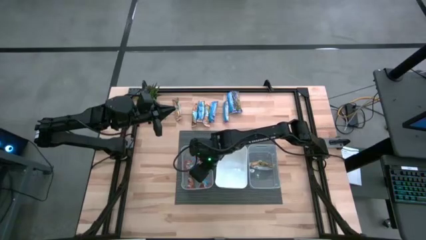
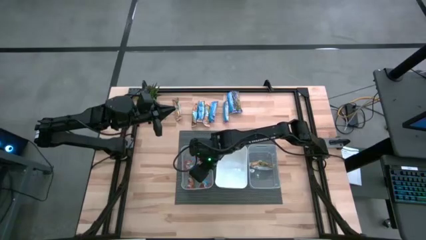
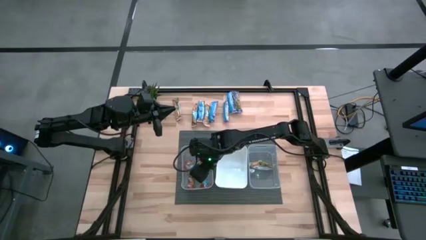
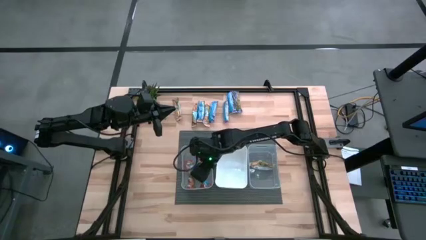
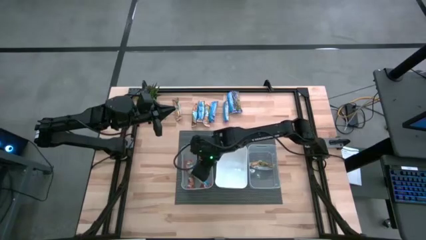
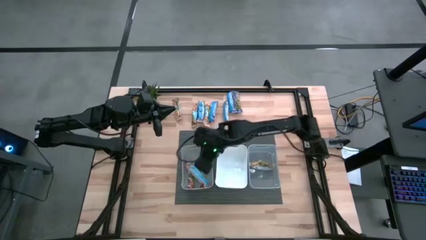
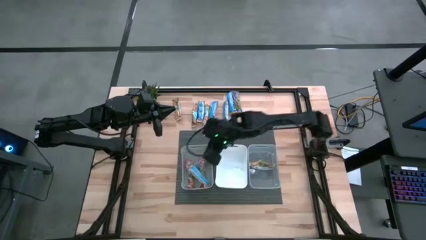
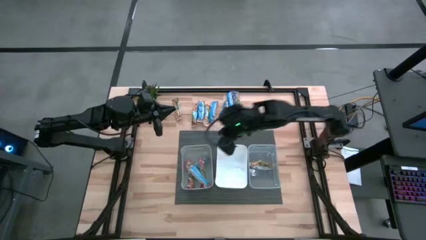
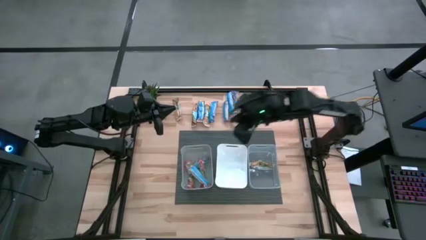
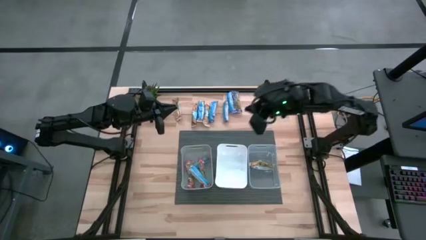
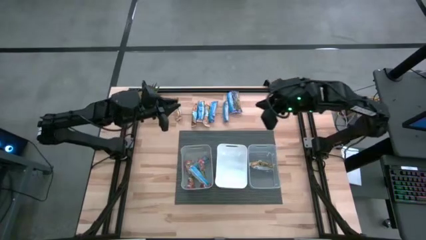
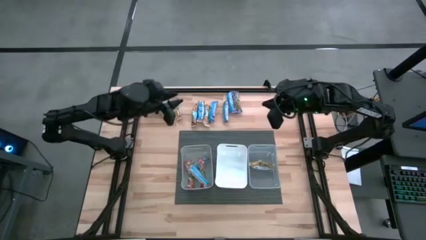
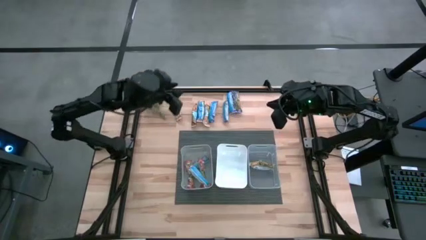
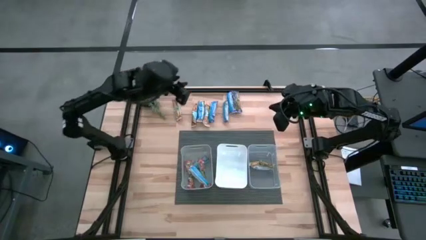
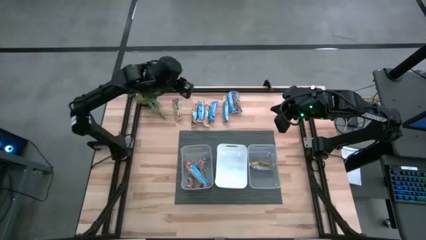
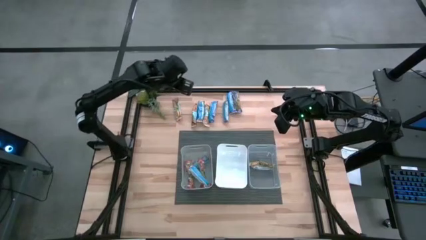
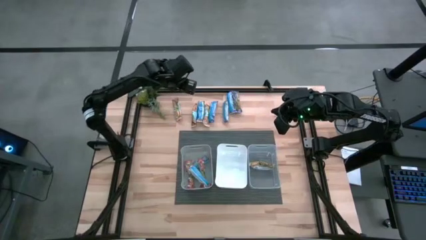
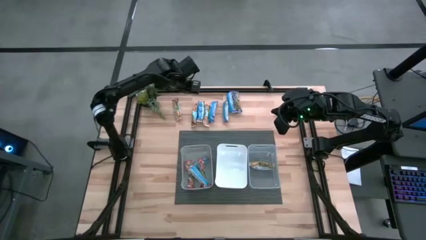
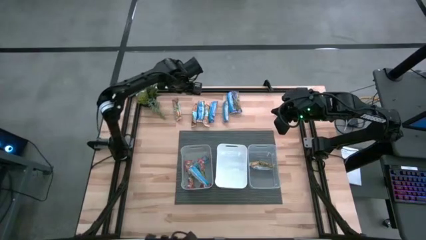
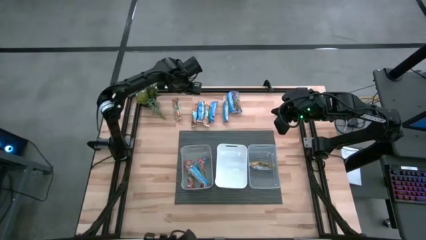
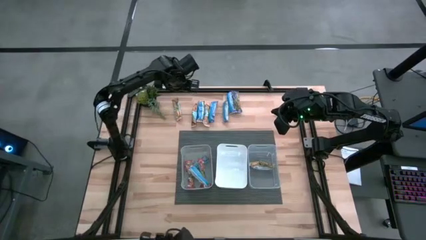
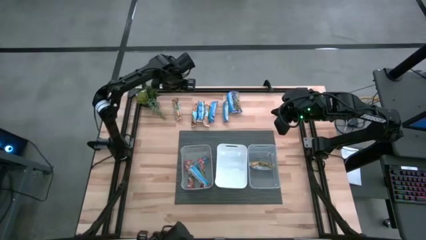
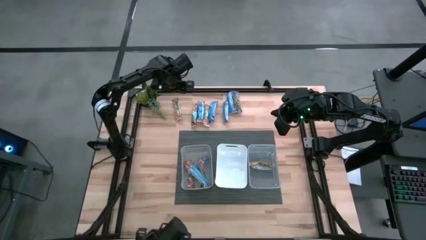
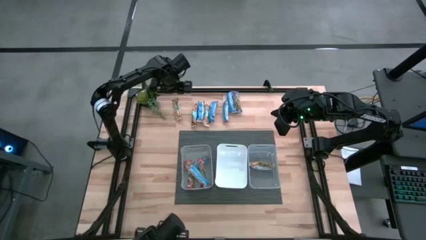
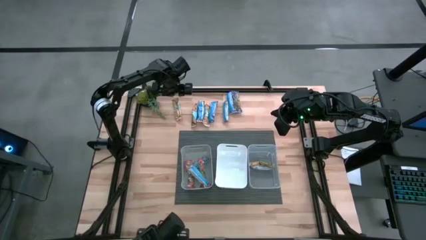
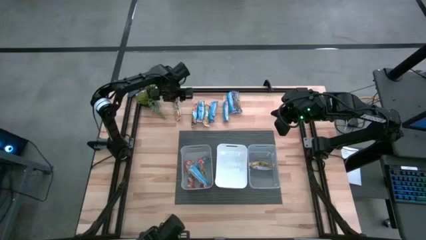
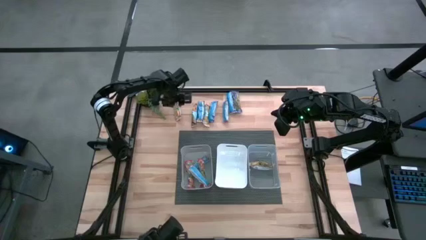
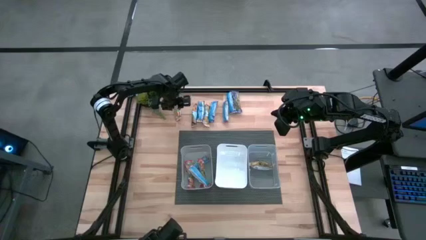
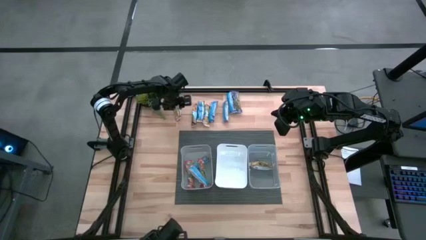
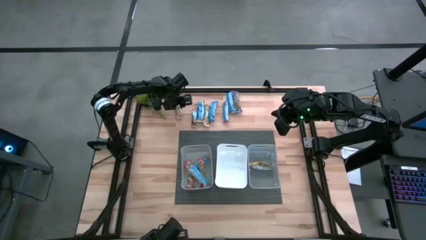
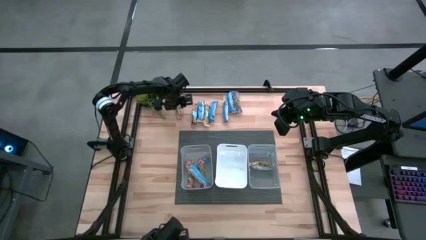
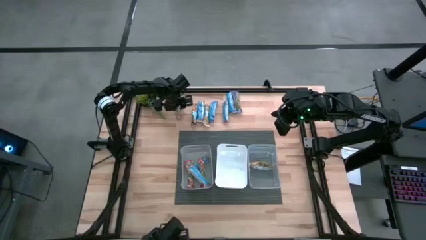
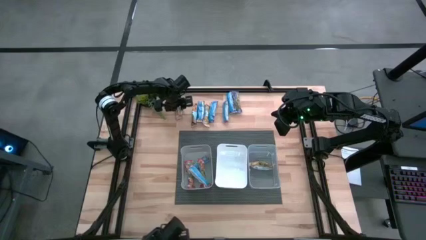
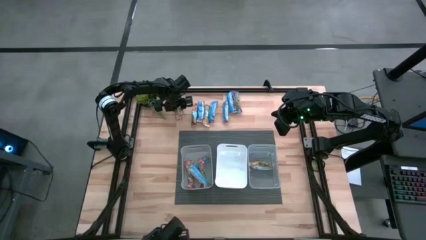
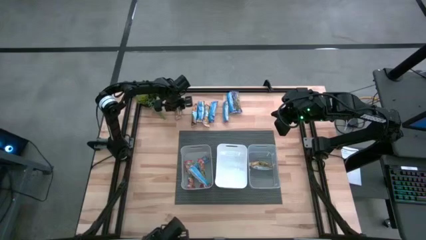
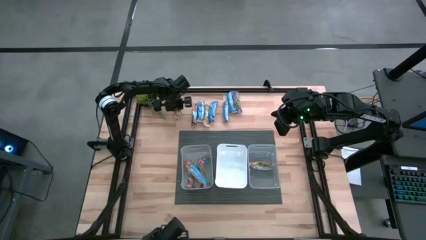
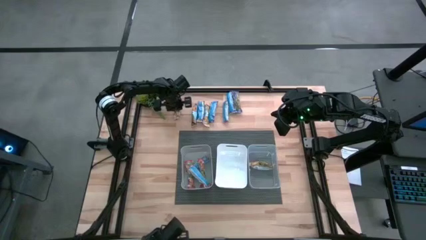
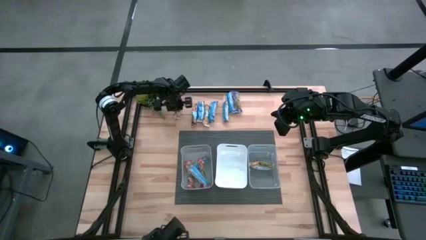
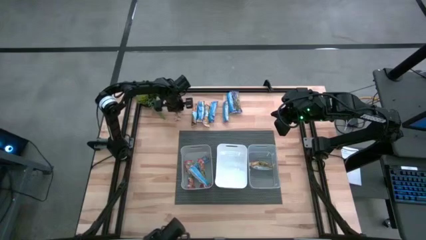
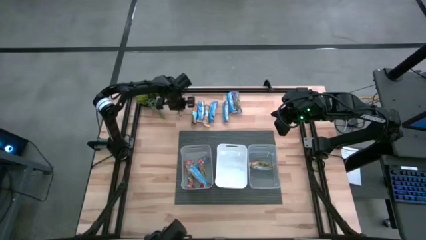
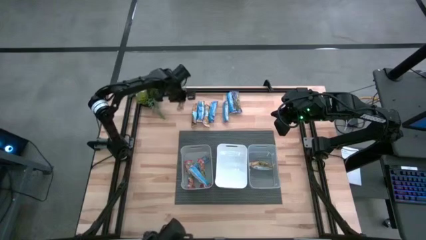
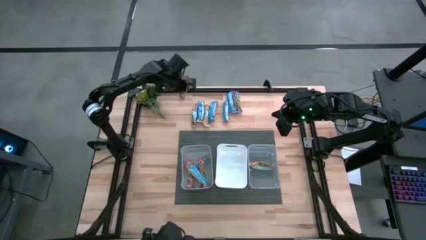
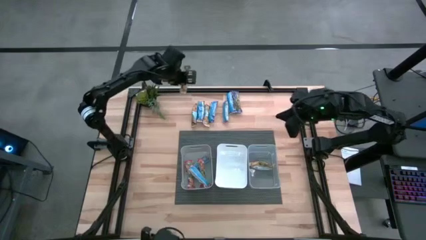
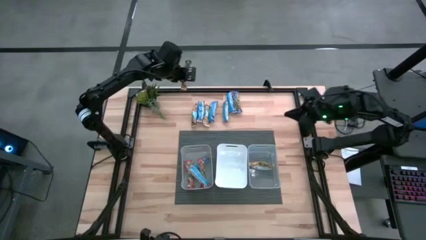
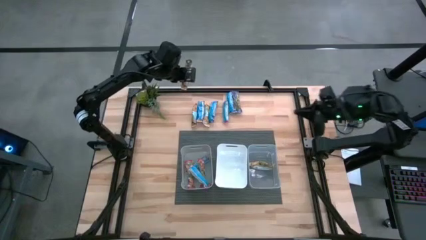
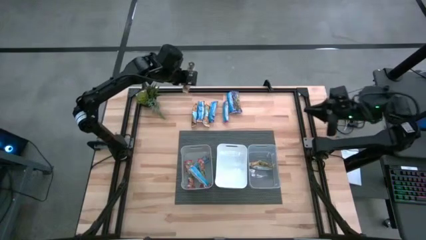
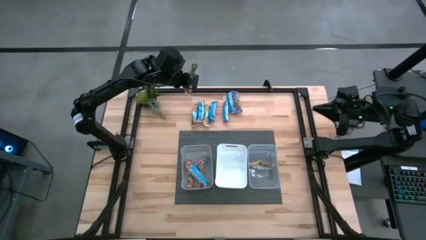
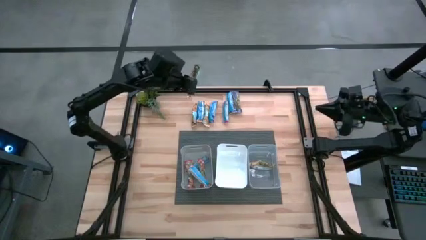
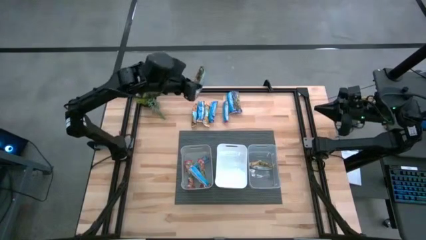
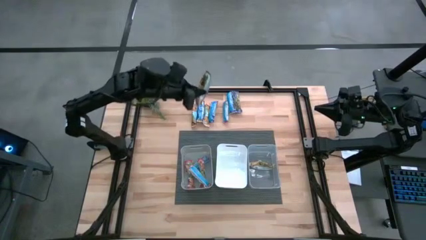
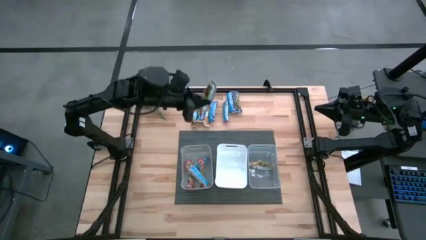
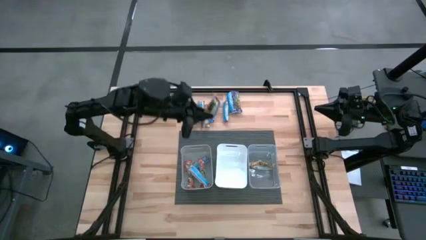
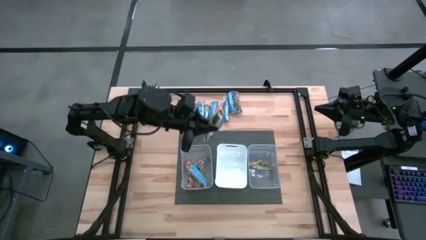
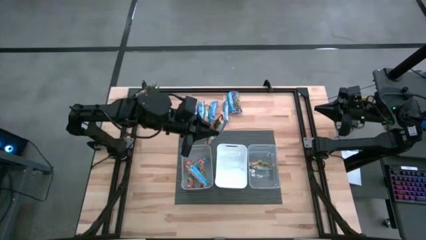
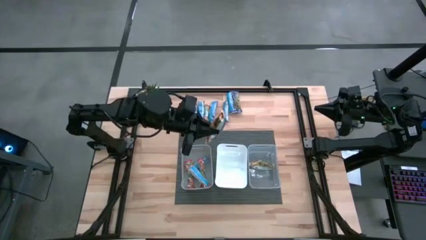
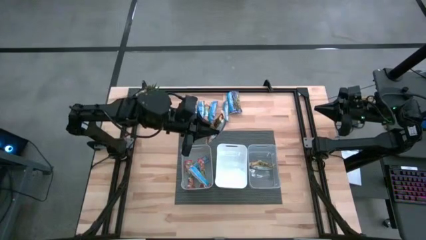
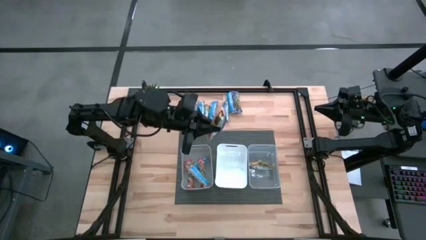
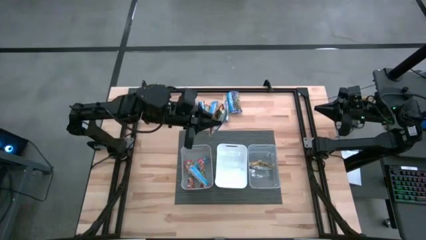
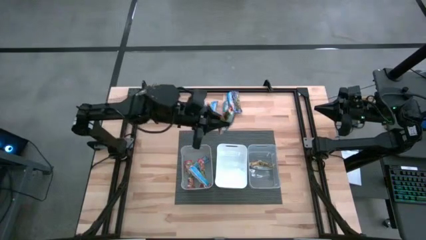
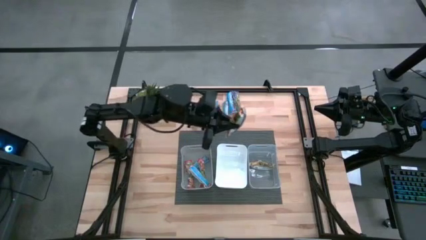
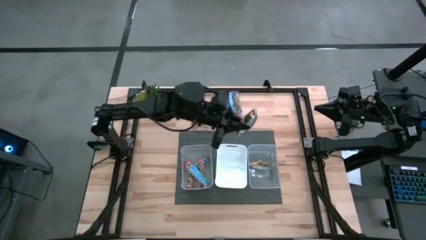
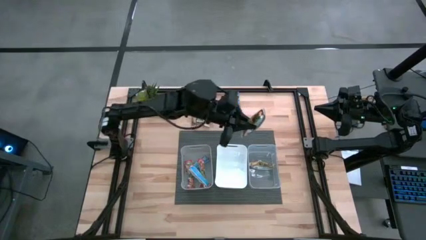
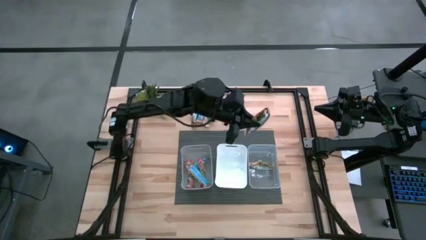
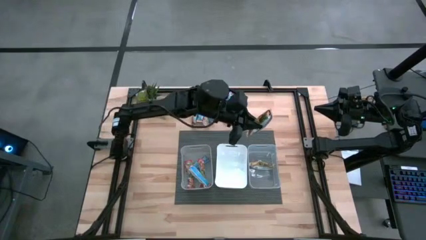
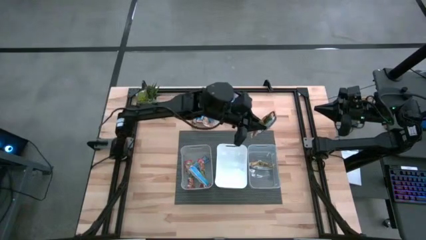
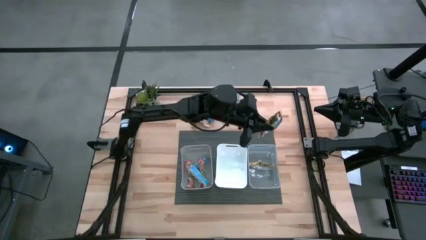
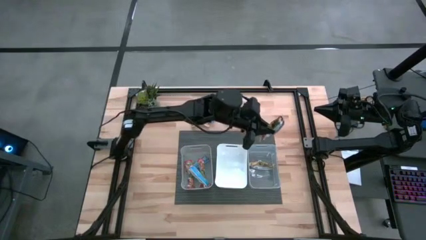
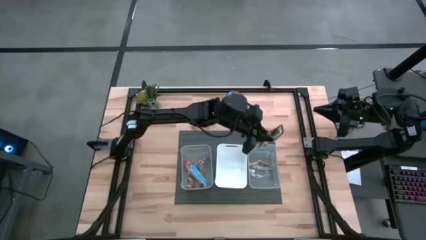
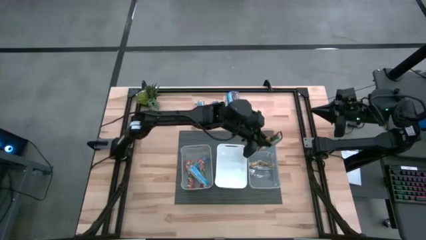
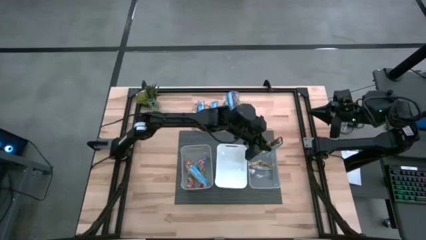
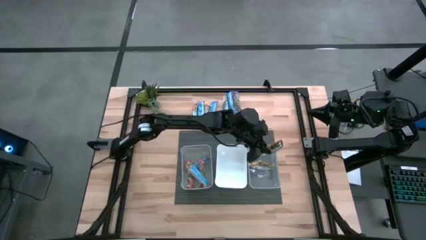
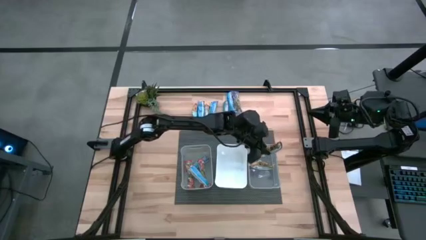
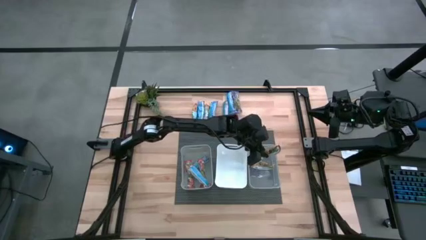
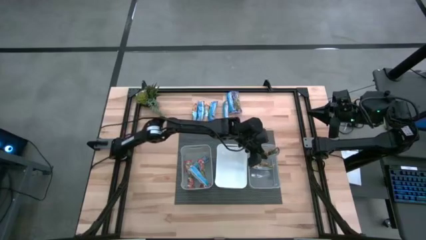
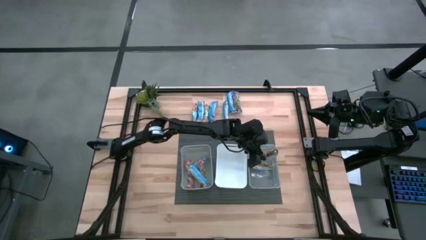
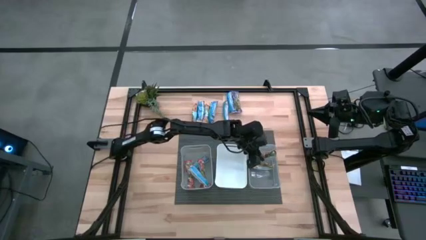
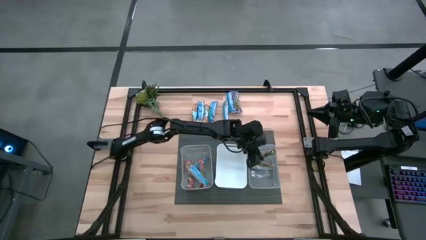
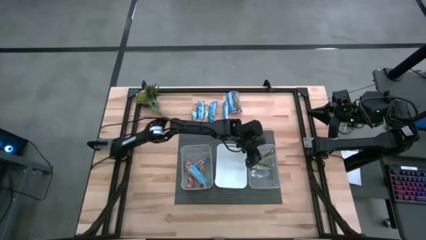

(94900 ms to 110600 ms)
Task: Pick and place Granola Bars by type
Put the orange granola bar into the transparent bin
